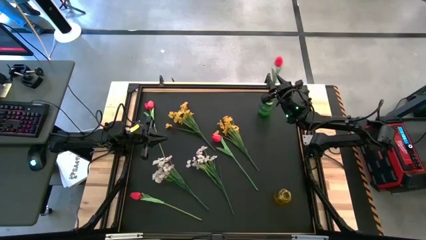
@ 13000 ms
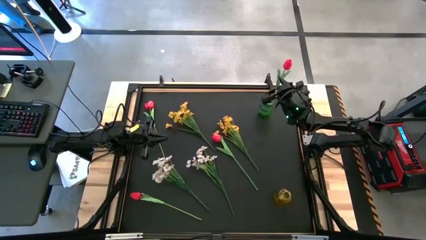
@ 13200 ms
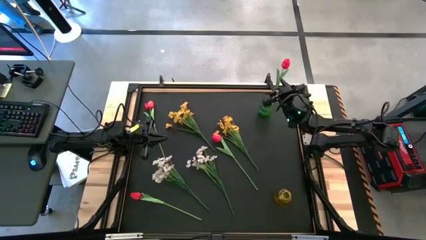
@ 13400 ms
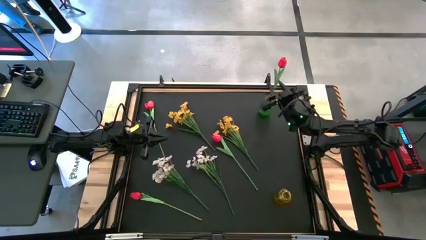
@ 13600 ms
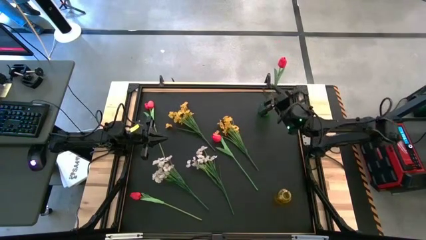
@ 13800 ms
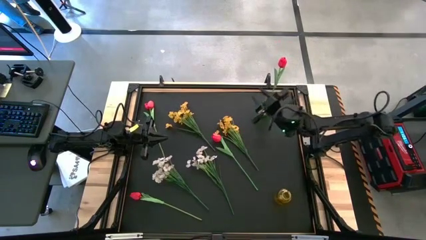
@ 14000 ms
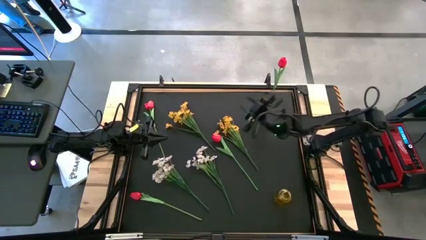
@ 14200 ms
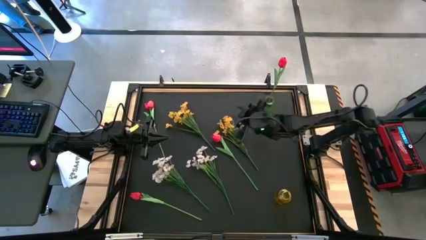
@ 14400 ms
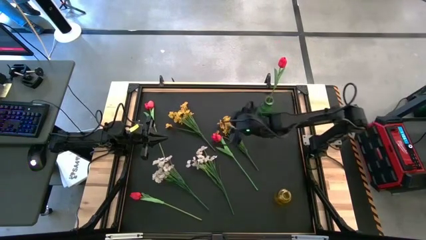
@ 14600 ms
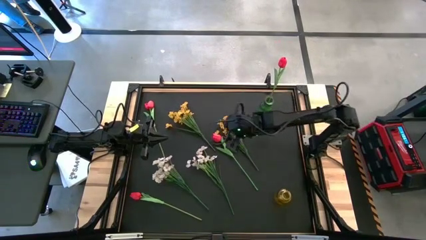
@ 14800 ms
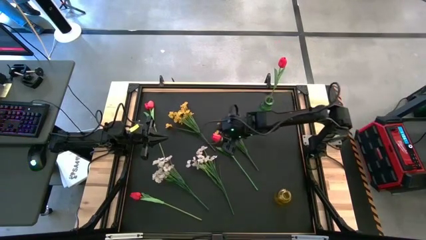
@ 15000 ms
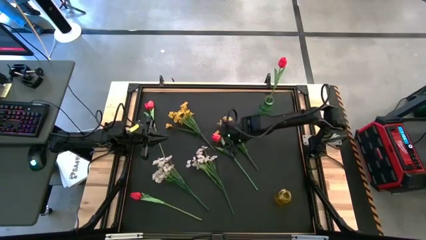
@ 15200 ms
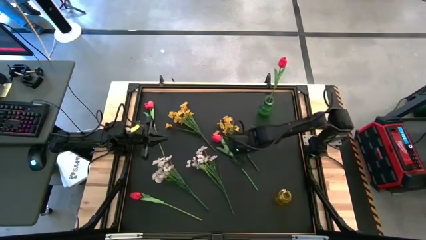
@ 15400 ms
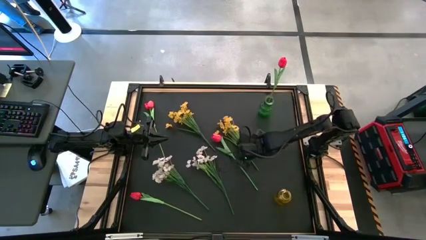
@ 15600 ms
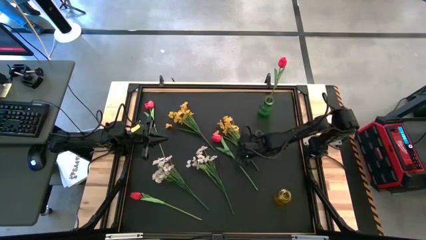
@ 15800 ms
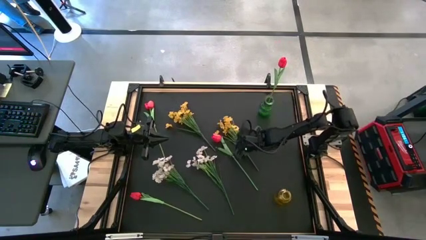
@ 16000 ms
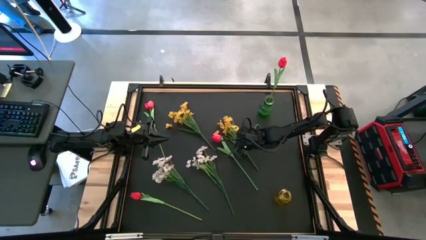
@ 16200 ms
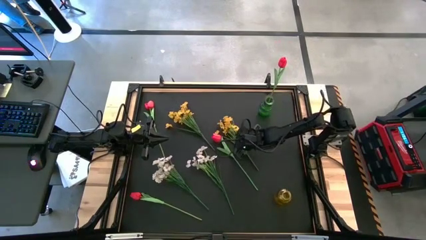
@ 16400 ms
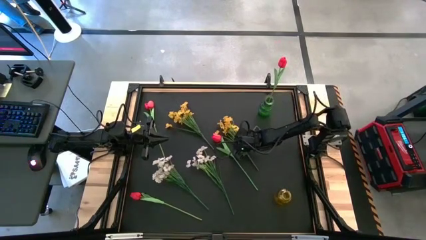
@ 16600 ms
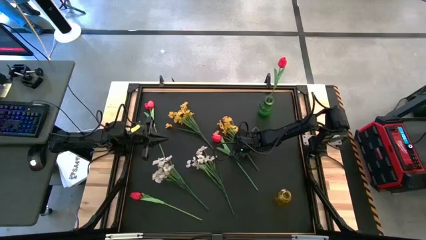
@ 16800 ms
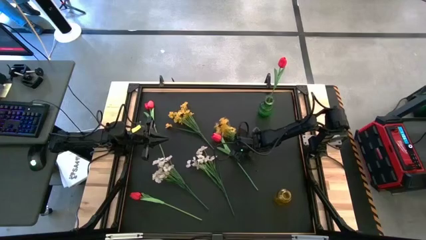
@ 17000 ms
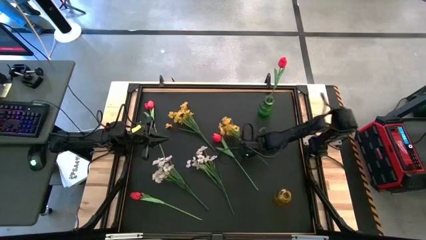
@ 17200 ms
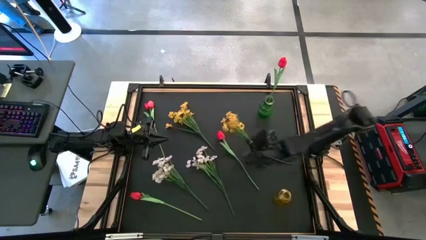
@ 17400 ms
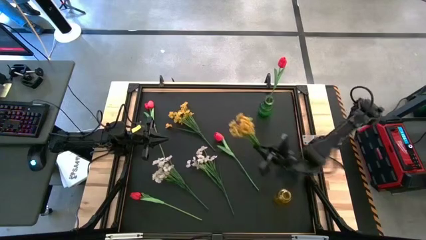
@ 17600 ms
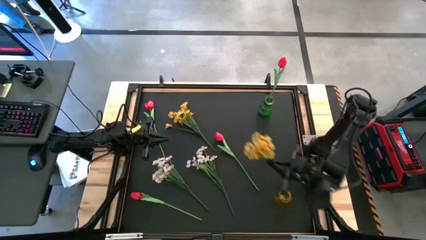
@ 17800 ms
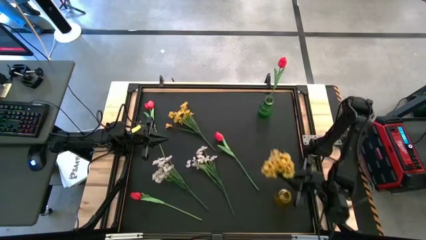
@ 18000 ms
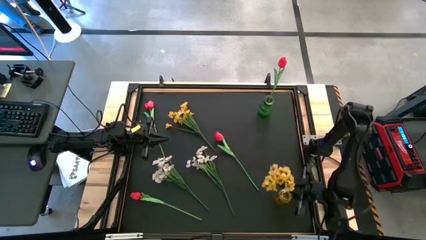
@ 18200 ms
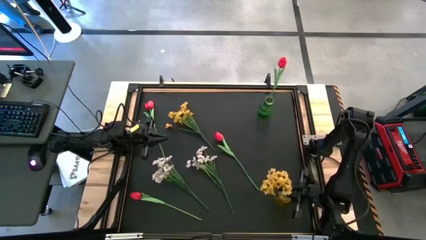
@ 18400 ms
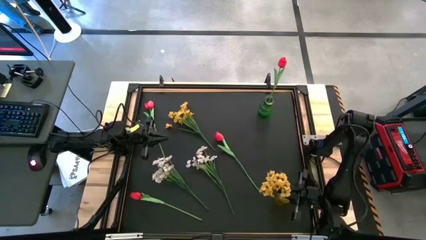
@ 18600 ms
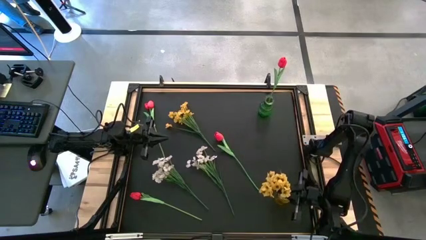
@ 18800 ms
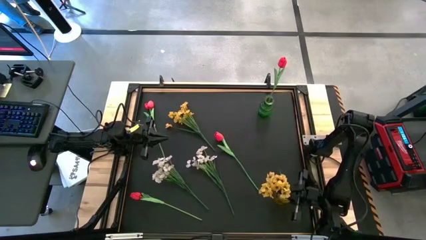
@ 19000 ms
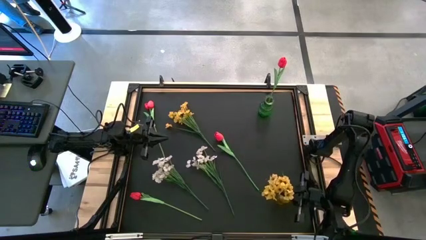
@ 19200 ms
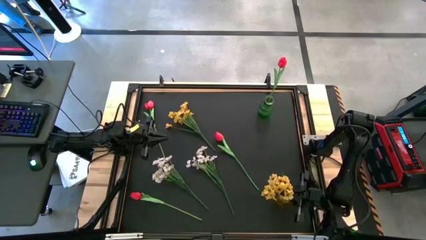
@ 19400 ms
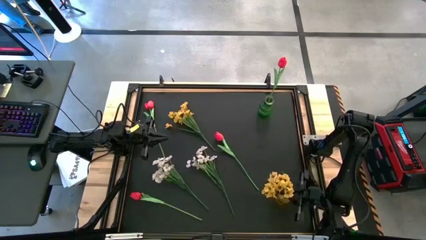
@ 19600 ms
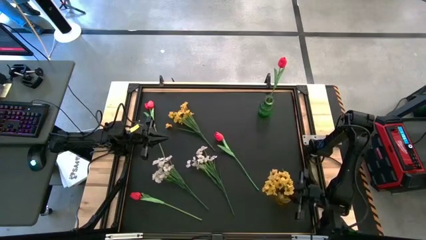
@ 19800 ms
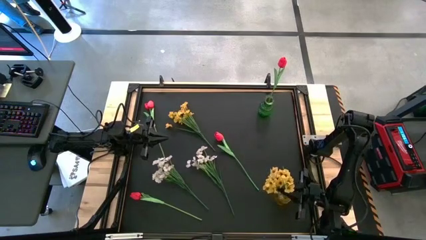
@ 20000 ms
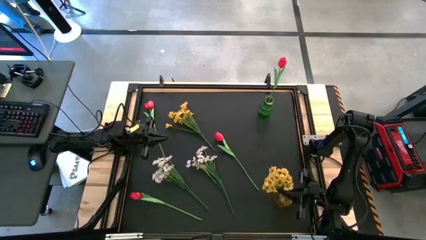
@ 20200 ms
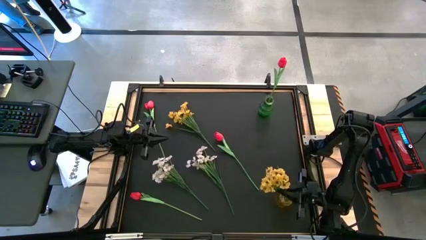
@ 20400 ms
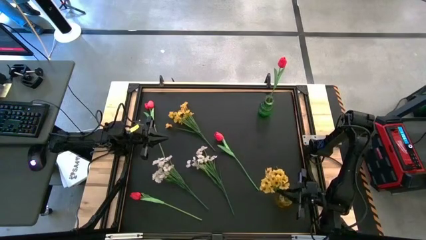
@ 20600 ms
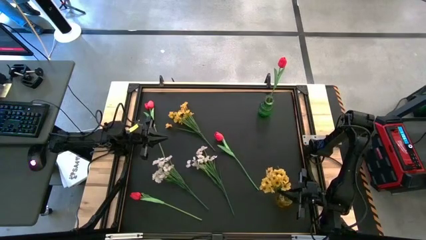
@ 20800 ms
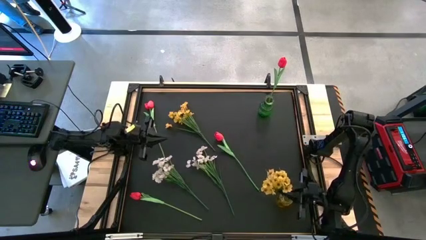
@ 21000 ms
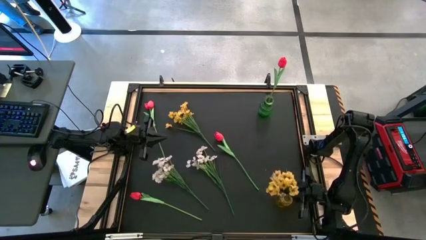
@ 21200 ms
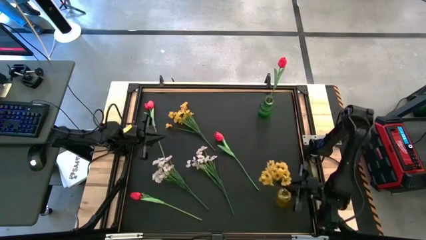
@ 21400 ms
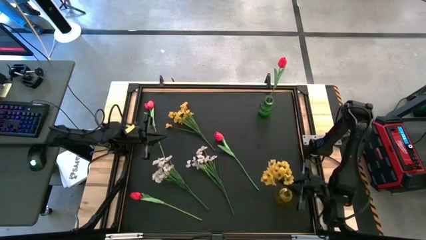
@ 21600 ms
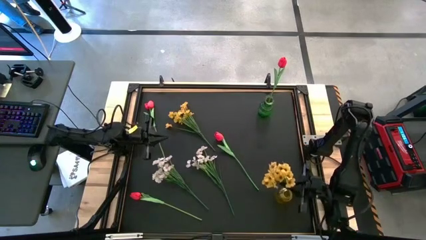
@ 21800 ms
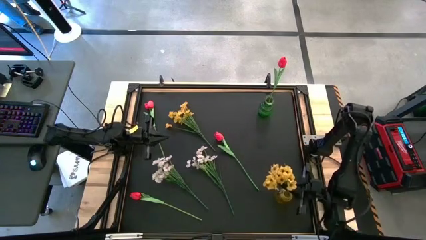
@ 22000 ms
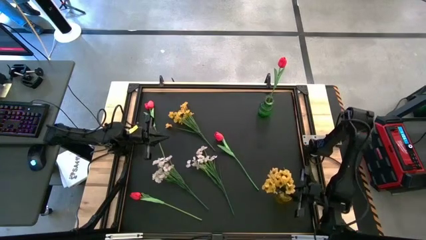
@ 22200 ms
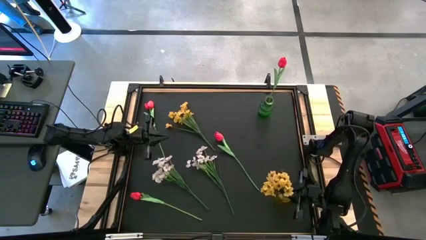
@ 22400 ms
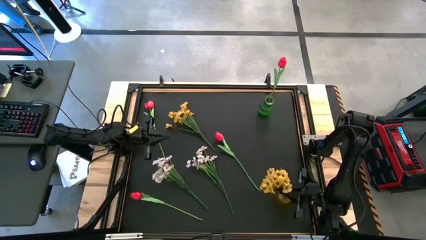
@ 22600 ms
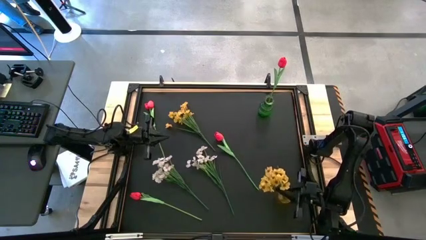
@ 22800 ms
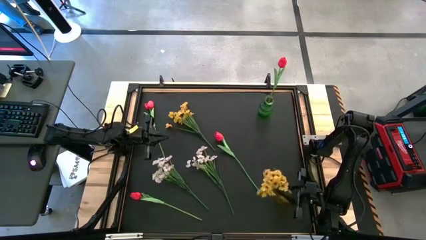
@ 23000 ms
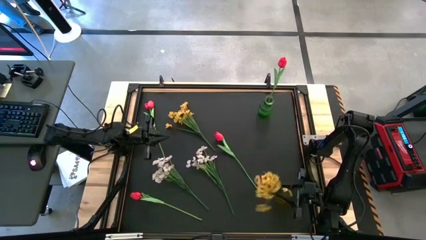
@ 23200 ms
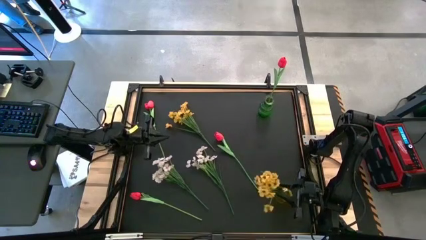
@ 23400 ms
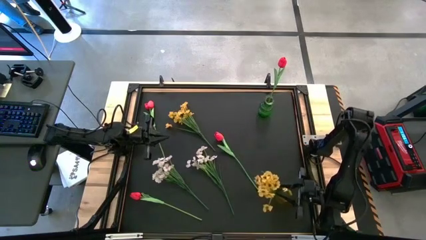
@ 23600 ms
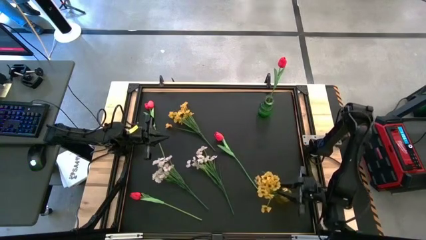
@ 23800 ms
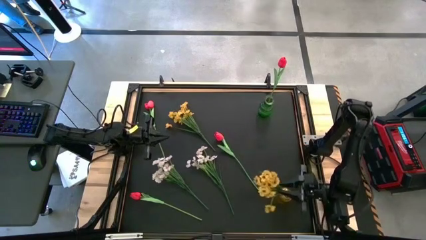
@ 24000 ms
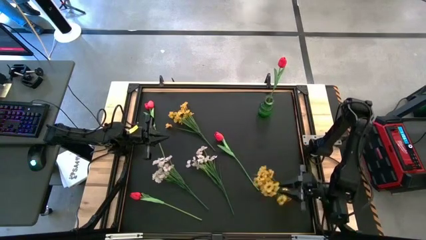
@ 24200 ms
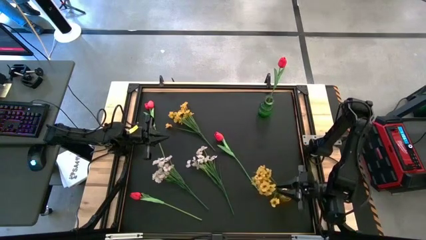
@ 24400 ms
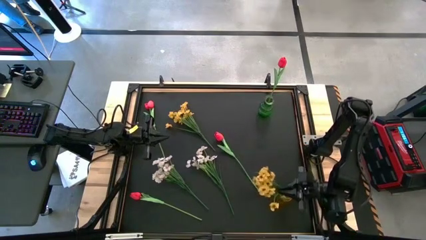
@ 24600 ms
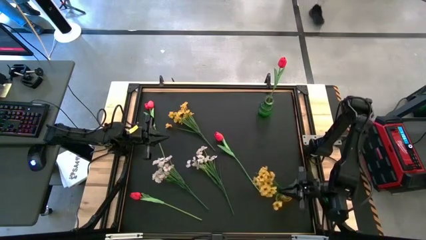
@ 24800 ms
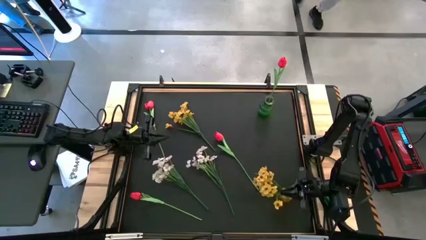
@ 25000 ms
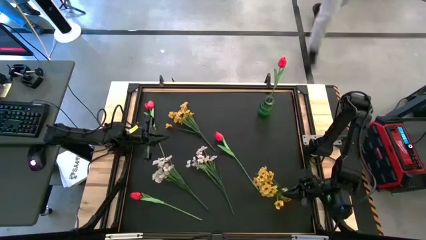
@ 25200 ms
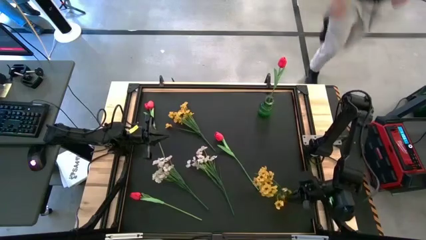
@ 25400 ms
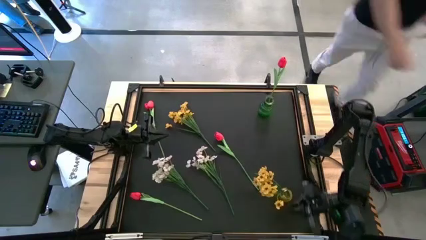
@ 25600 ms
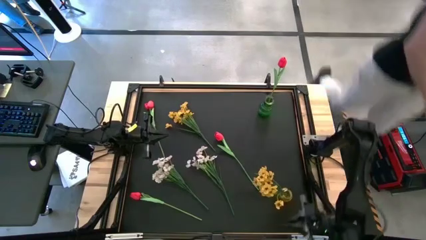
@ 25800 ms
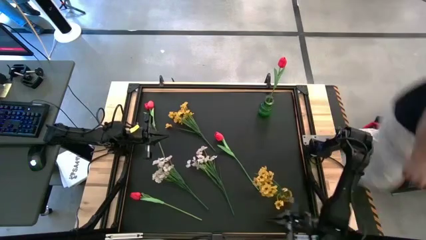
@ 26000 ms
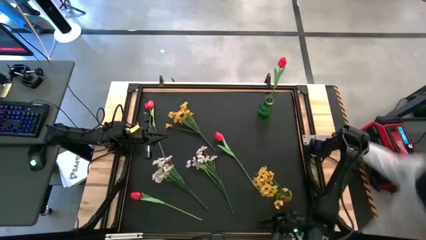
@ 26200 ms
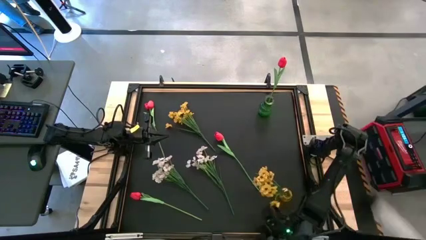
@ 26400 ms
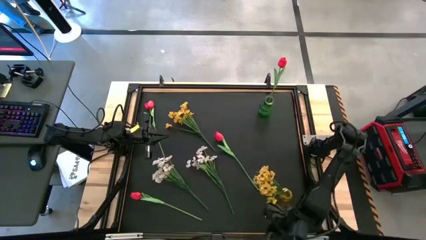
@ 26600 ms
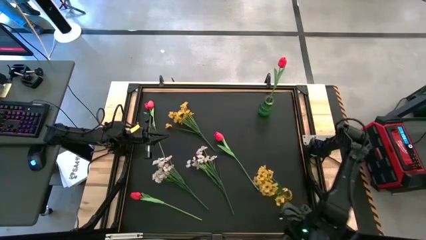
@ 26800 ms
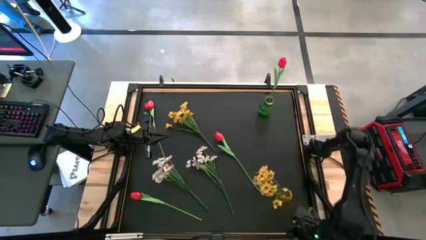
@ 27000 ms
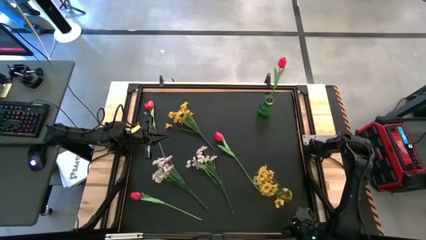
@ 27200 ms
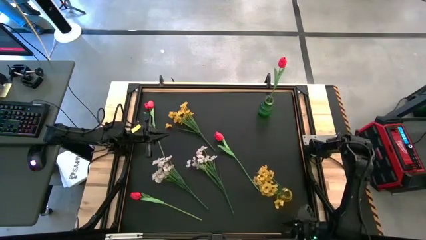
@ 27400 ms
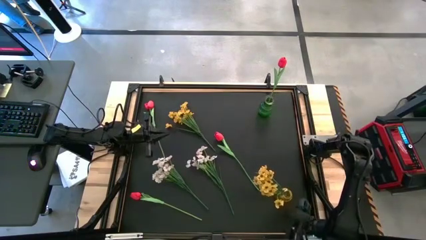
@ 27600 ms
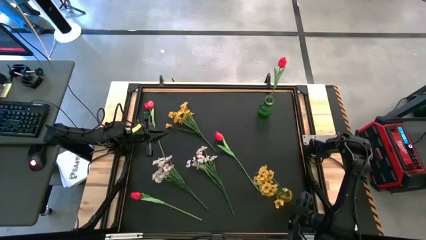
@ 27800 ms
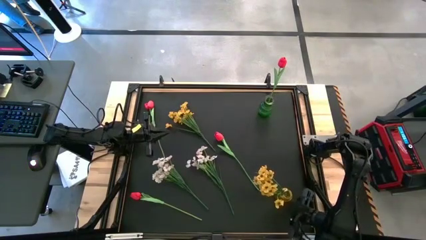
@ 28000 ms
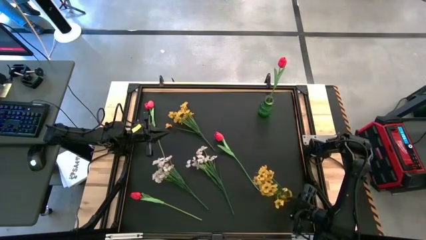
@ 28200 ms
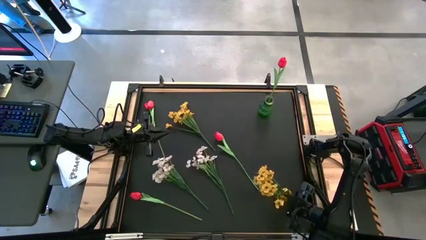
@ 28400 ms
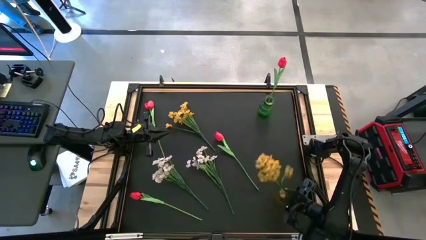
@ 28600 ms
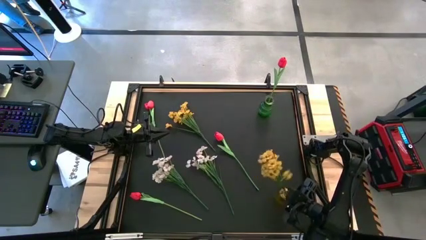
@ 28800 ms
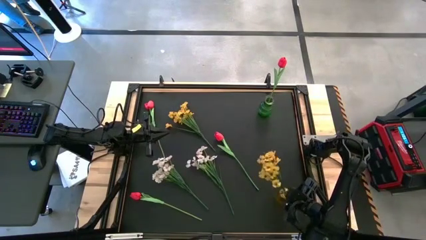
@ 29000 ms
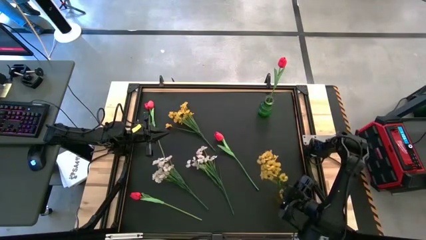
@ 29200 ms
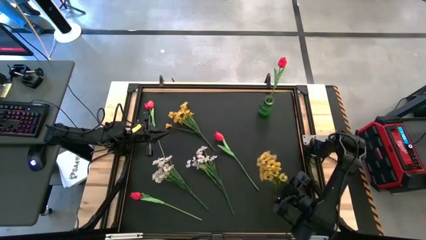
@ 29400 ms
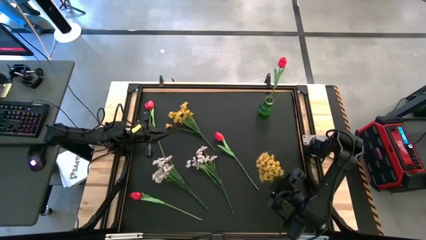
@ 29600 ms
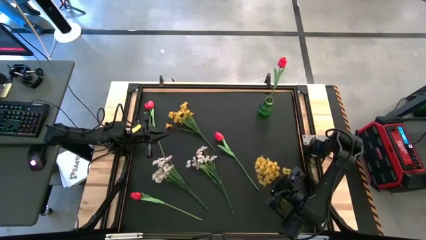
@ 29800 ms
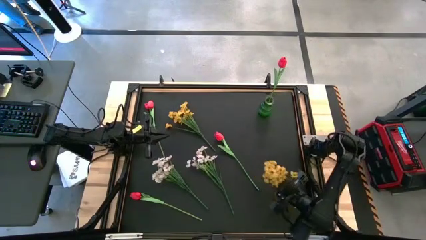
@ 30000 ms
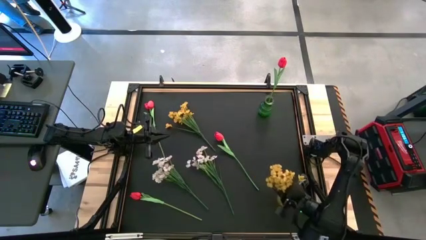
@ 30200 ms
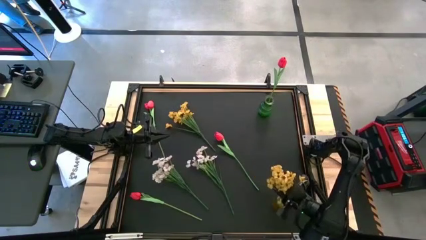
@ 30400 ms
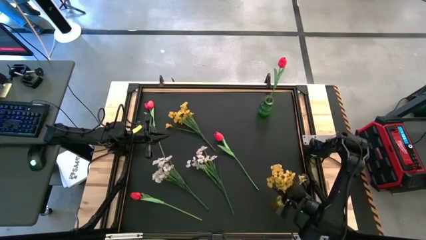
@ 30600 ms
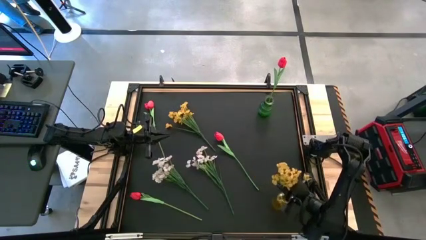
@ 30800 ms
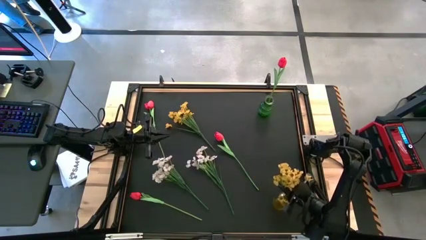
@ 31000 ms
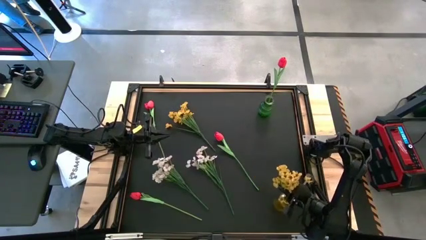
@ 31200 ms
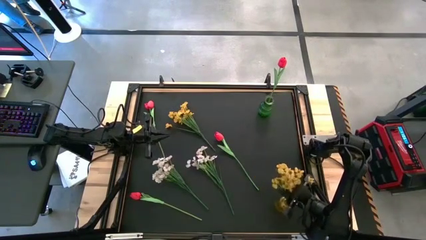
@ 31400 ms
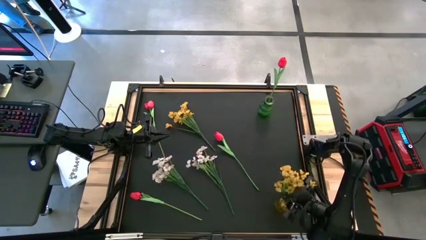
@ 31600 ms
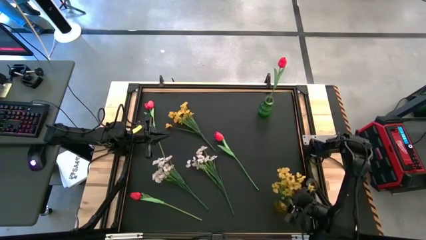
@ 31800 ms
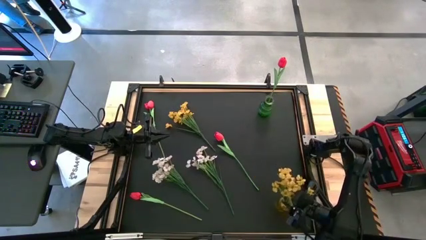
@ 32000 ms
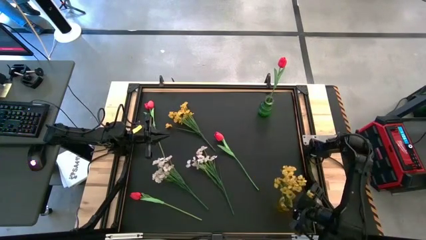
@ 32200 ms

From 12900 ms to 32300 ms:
Task: Sort flowers into vase by color
Put the right yellow flowers into the yellow vase
